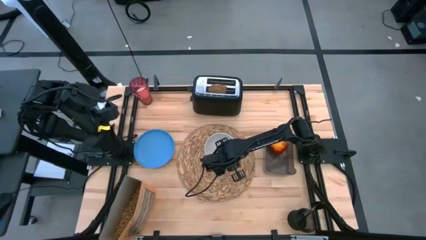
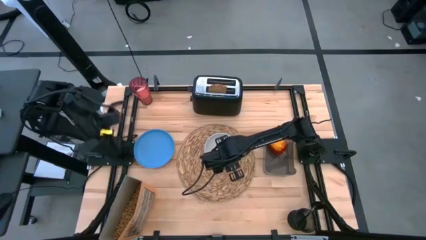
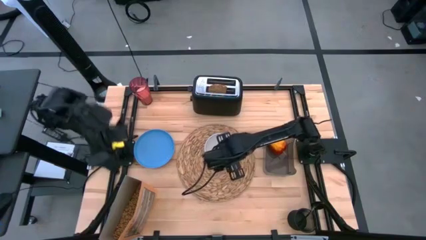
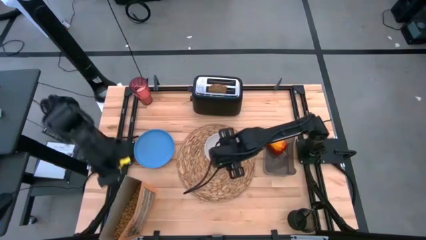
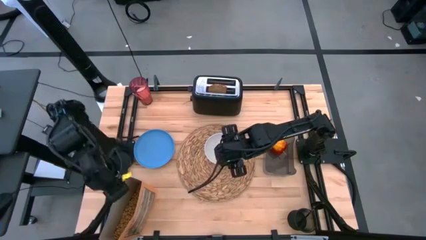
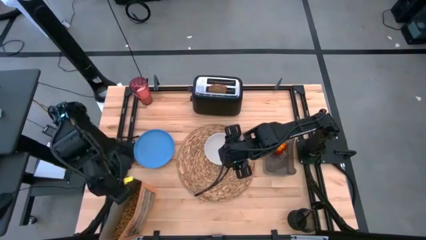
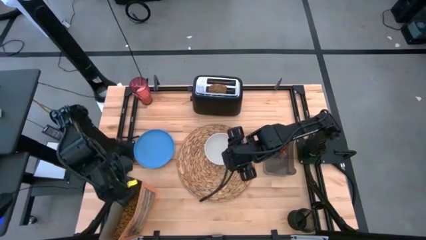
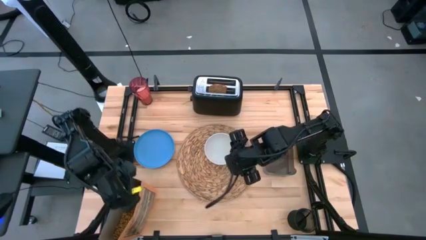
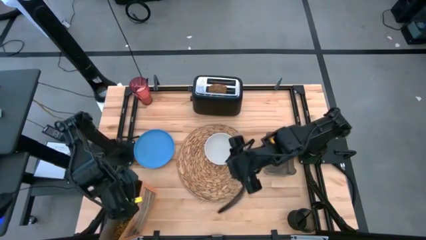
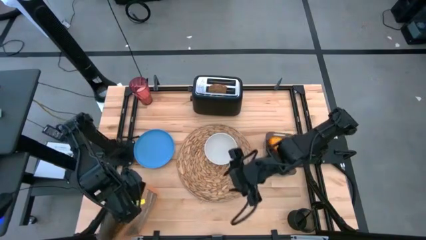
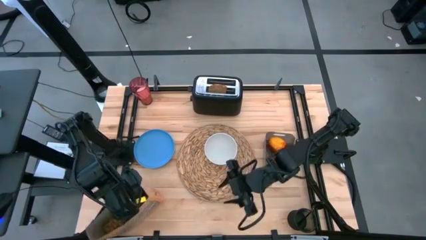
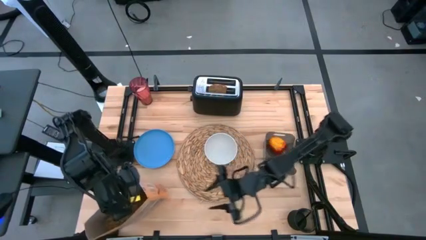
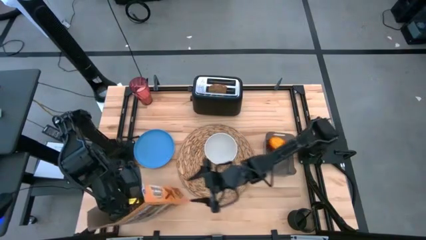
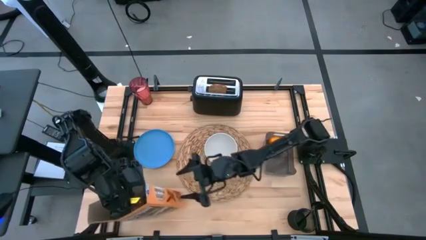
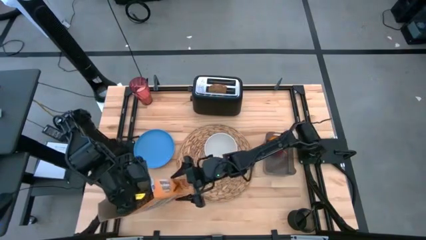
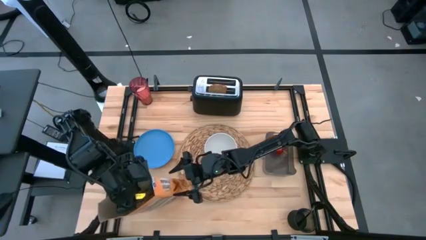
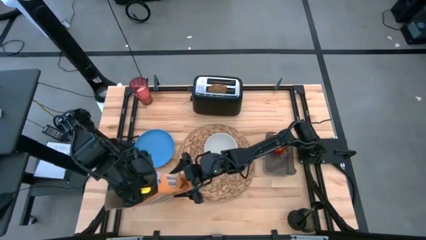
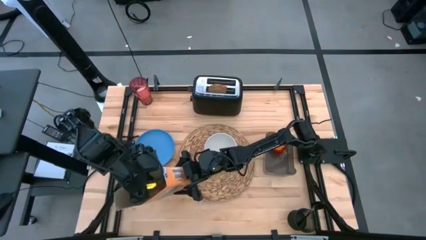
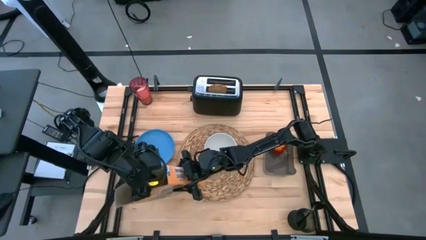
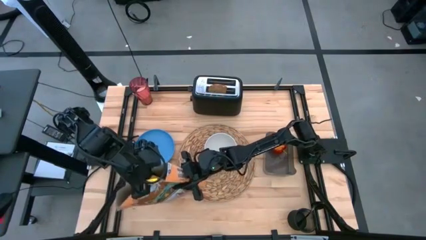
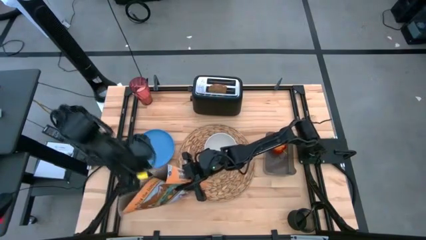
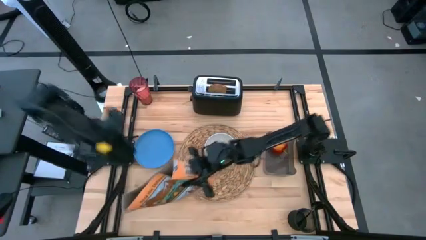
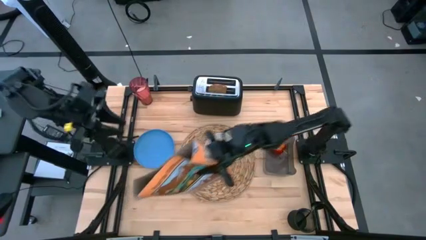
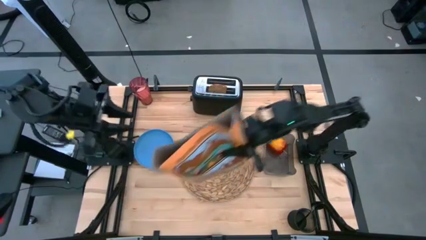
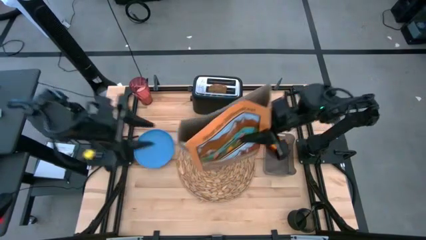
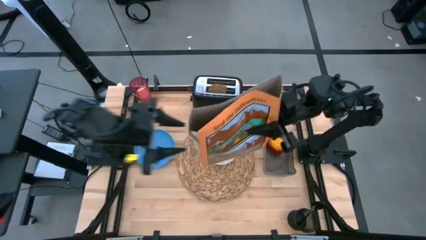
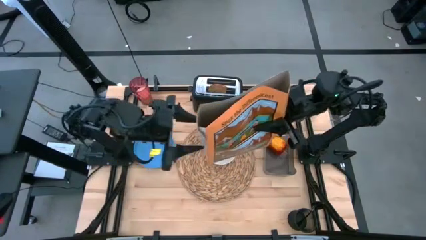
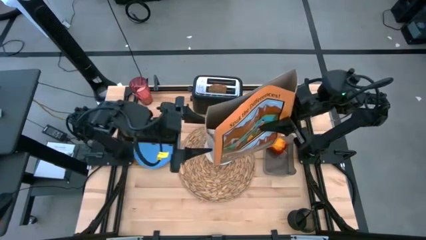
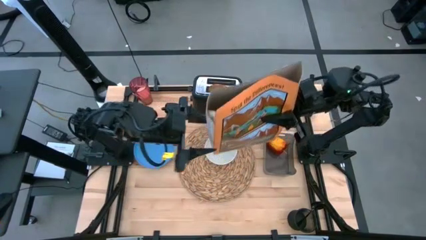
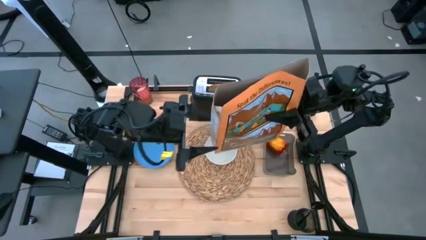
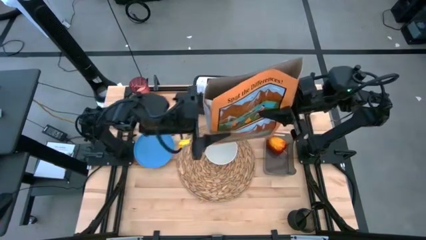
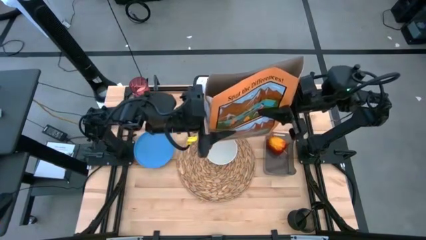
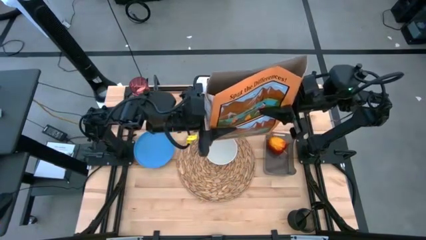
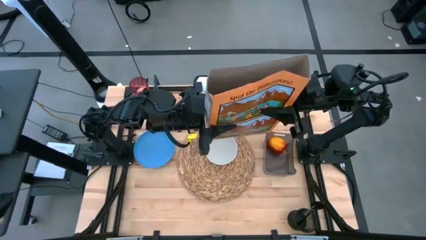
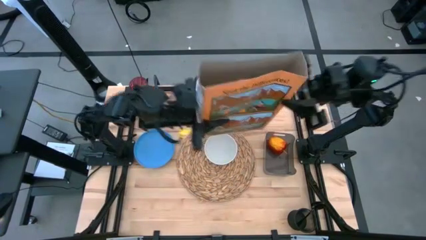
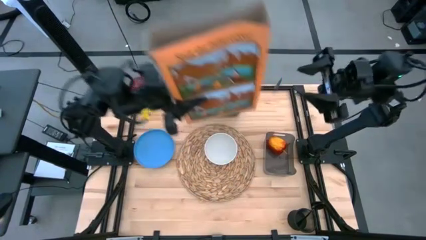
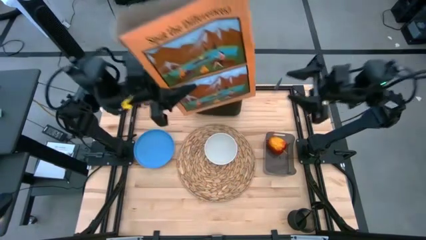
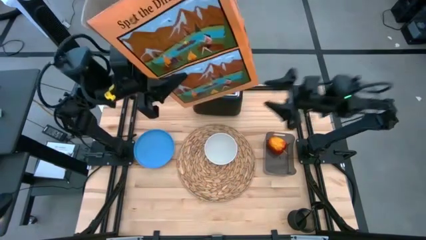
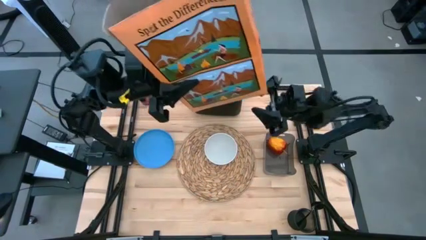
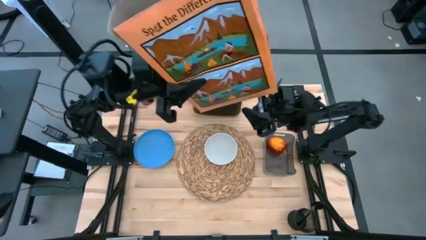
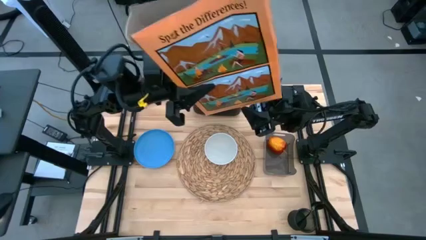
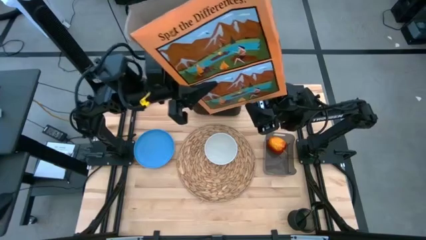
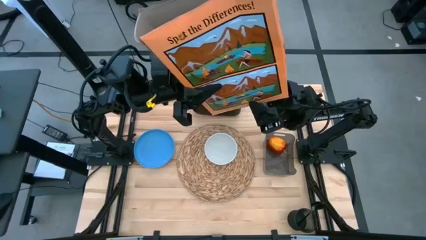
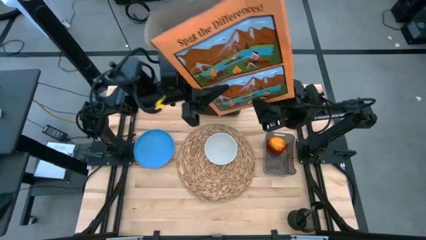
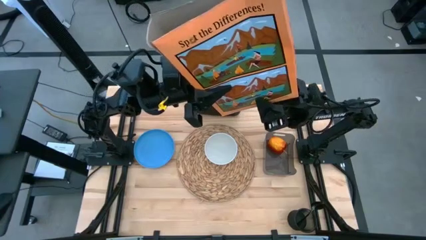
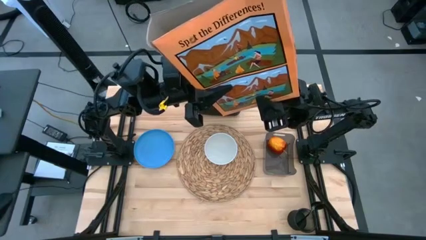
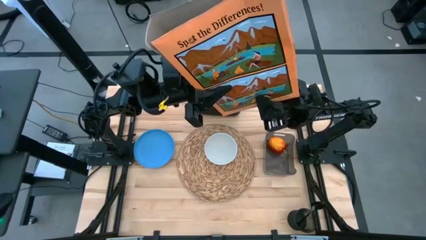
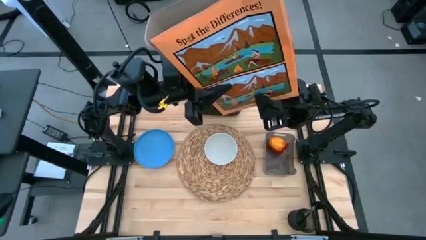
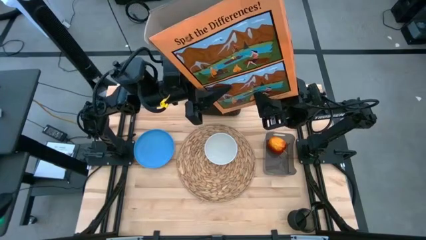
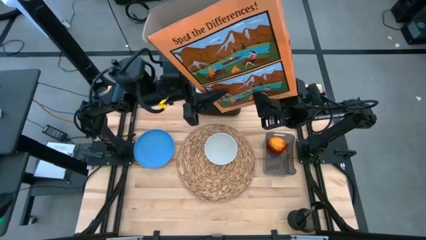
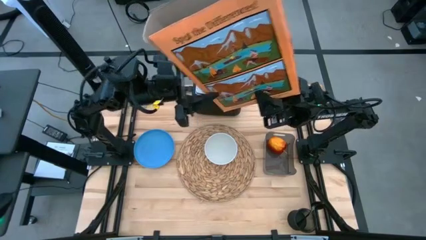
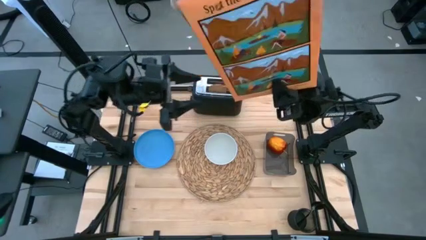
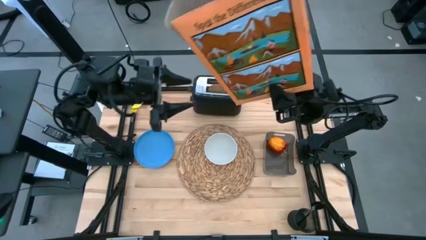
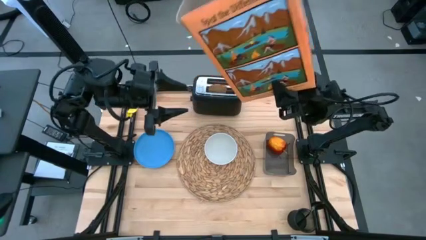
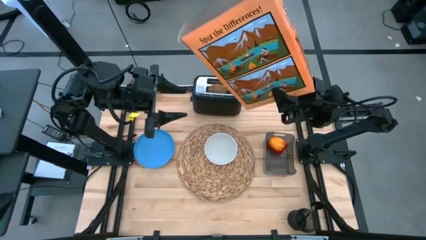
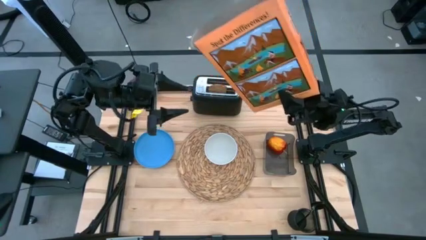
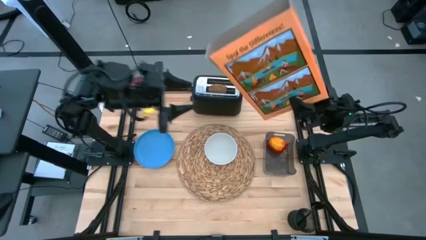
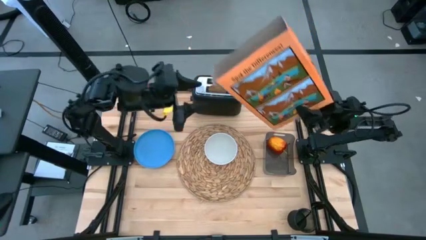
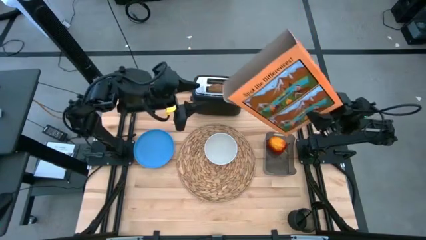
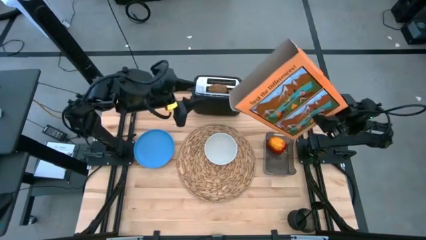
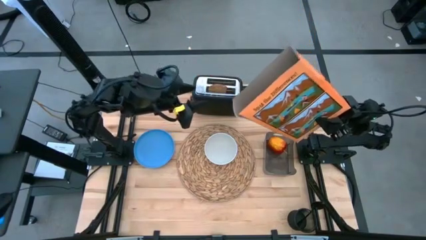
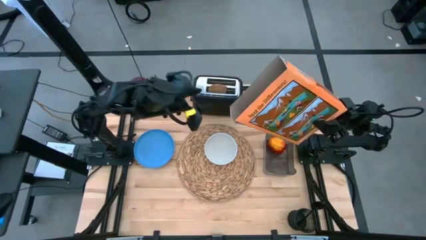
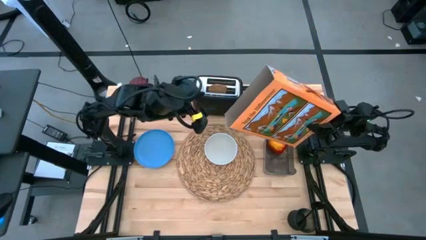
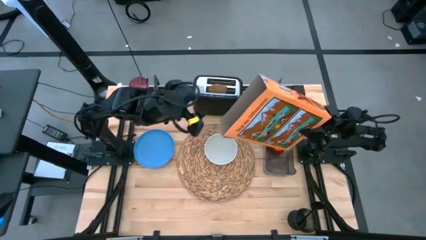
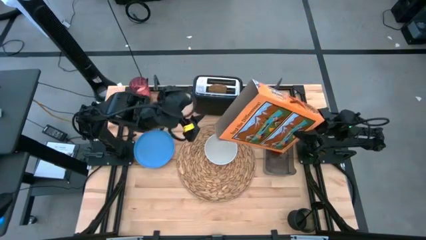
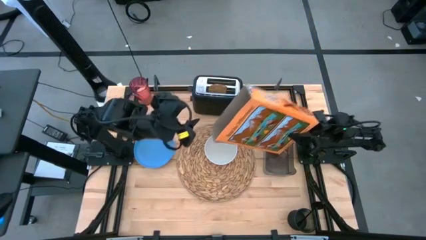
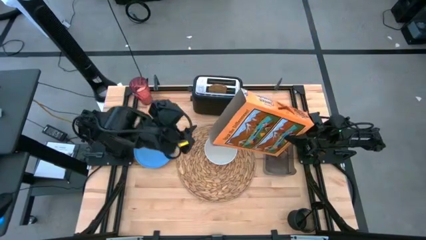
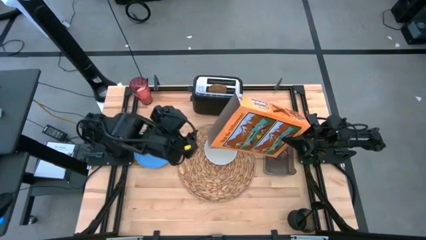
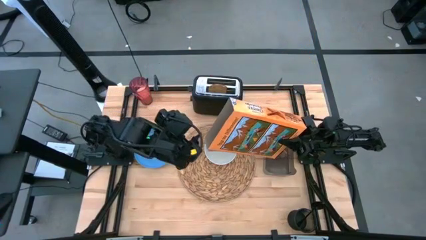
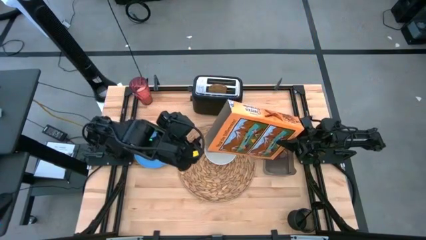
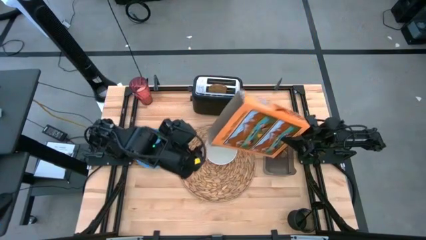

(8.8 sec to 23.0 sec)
Task: Arrange a breakfast setting
Pour the cereal from the cereal box into the bowl

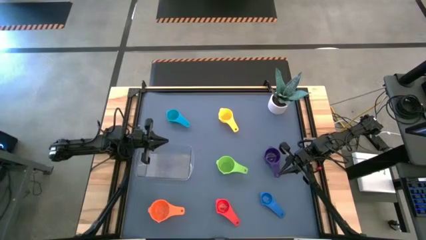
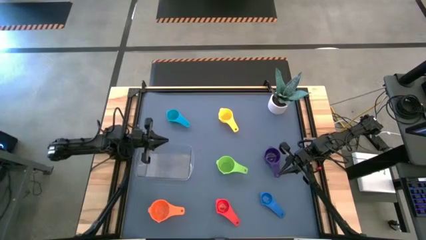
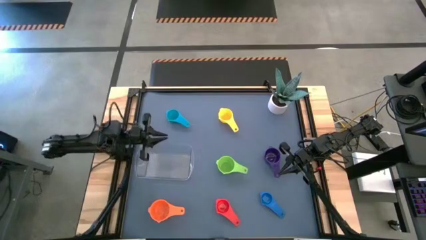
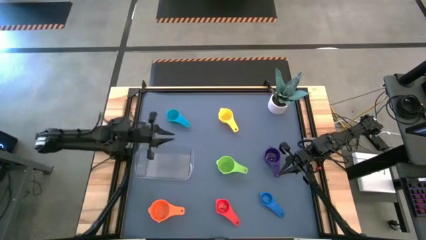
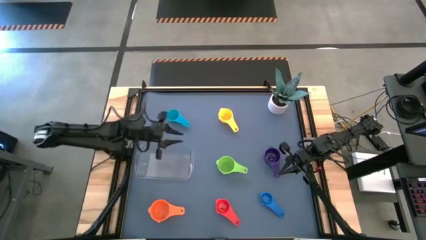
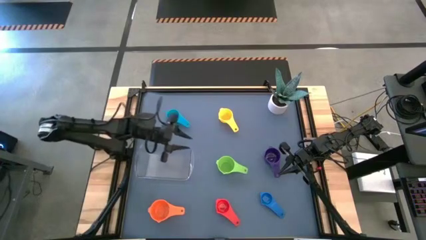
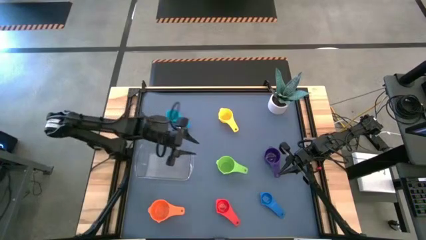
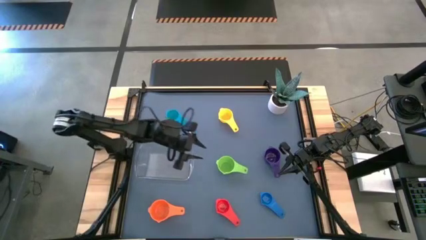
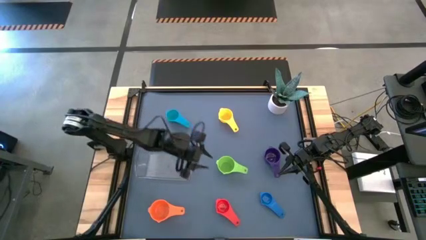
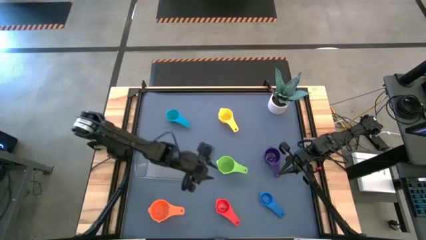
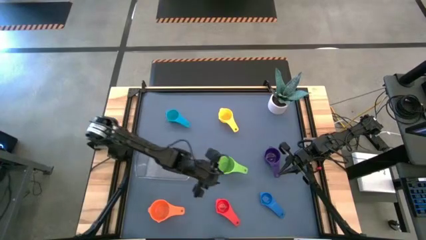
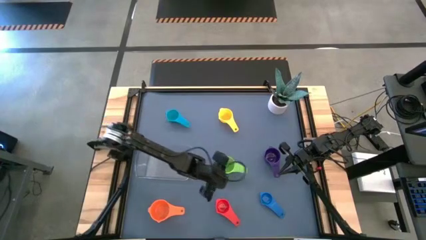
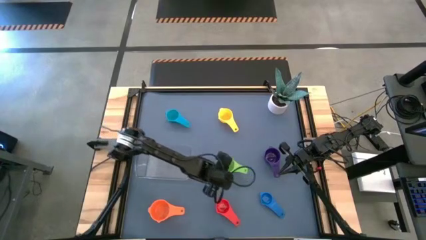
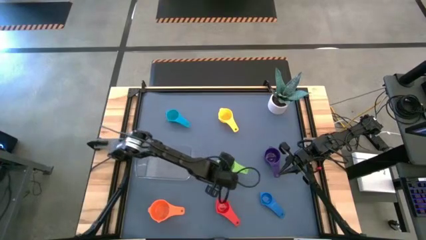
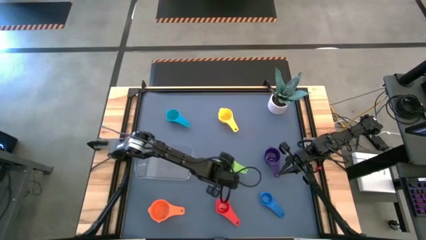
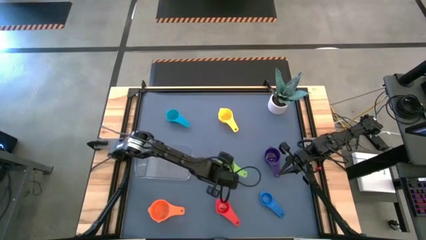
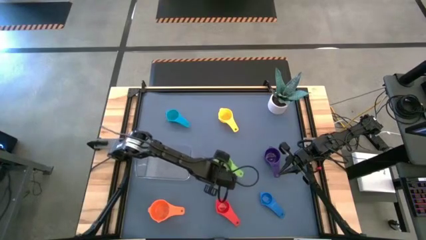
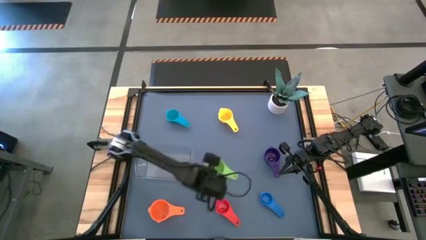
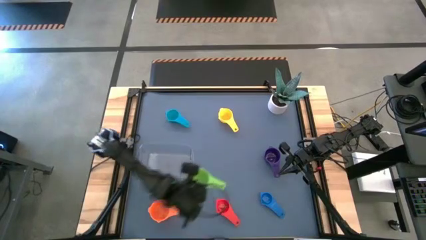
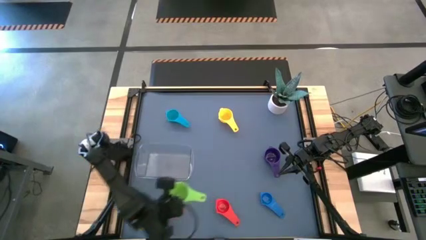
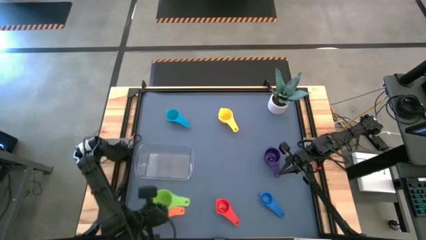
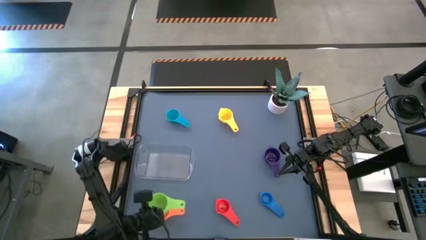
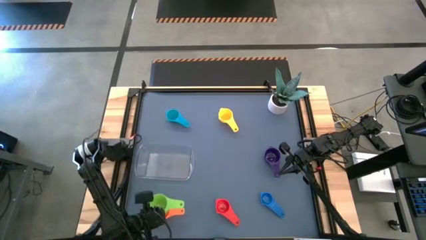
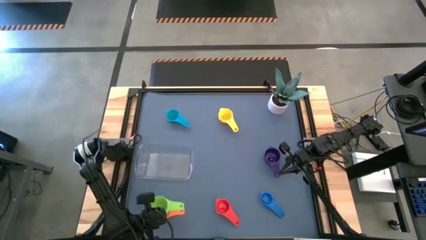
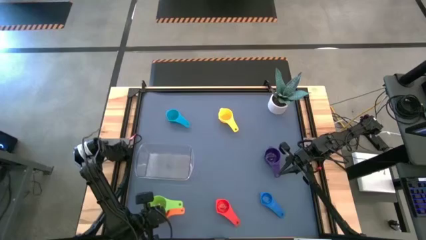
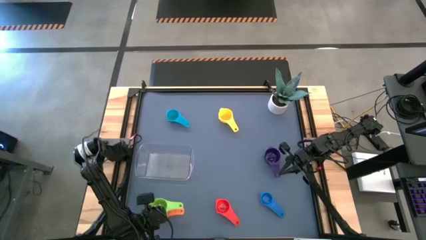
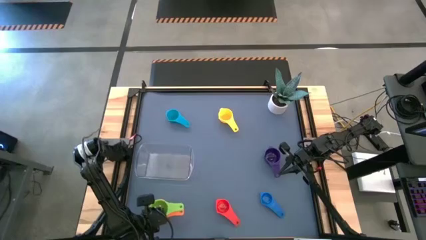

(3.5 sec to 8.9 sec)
Task: Nest measuring cups in basket
Stack the green measuring cup on top of the orange measuring cup
